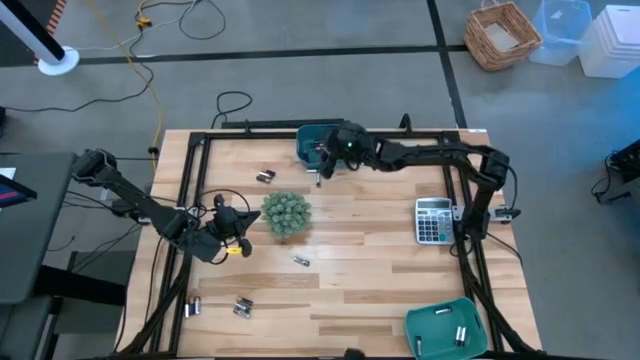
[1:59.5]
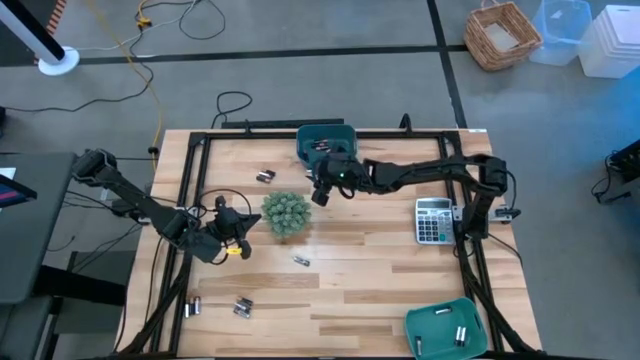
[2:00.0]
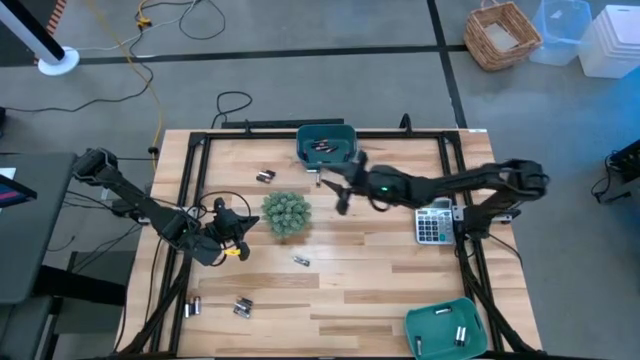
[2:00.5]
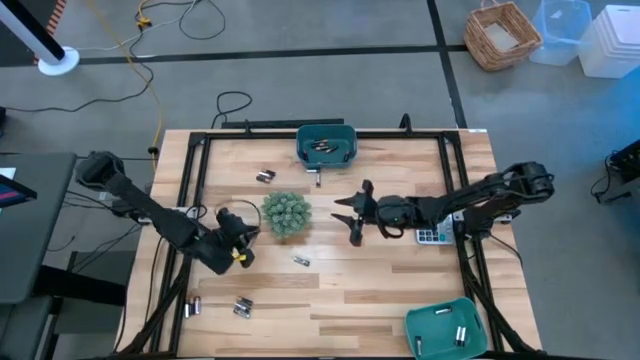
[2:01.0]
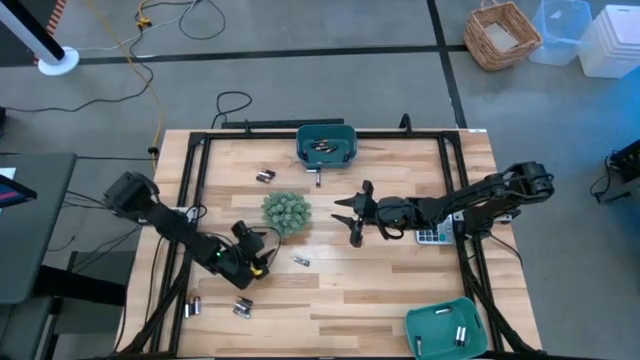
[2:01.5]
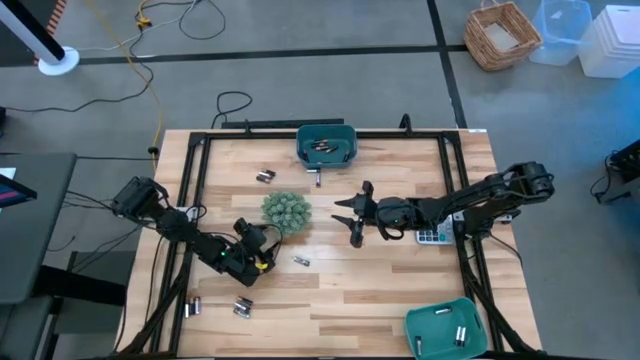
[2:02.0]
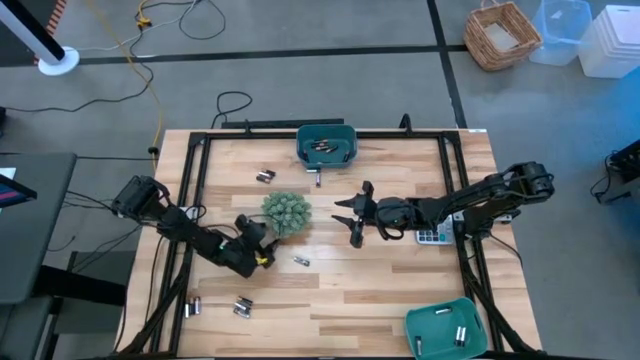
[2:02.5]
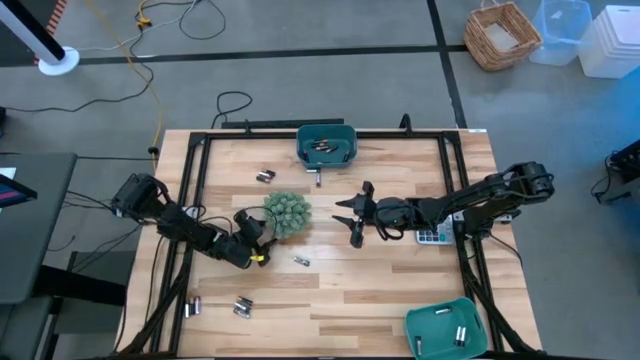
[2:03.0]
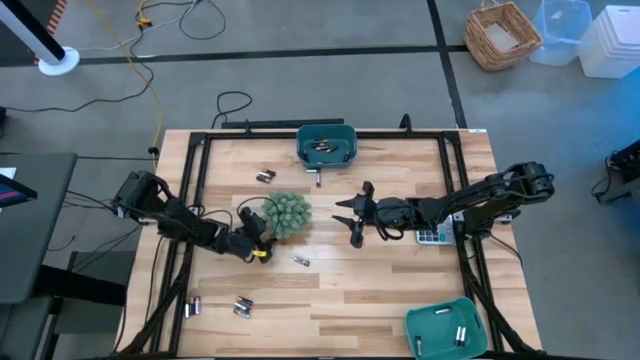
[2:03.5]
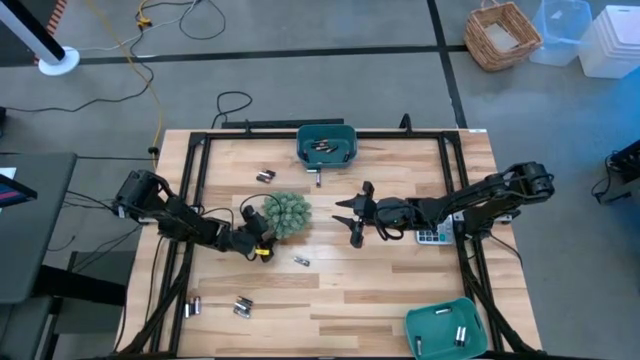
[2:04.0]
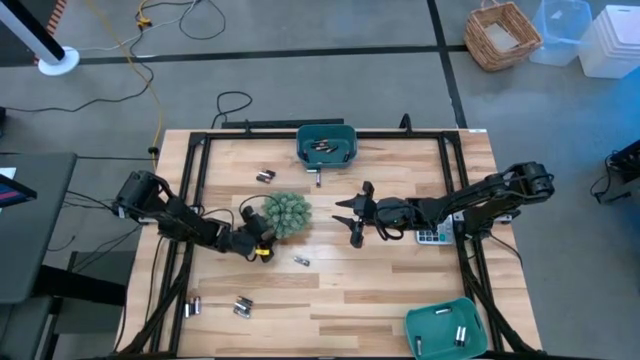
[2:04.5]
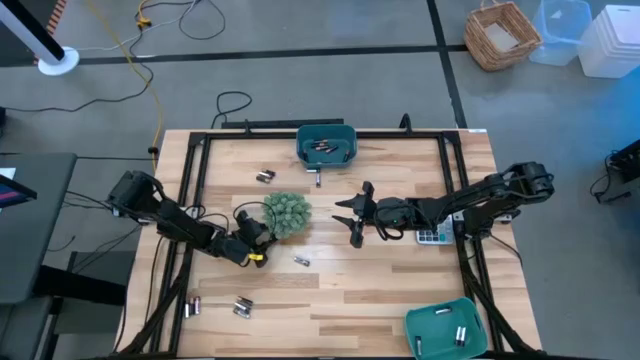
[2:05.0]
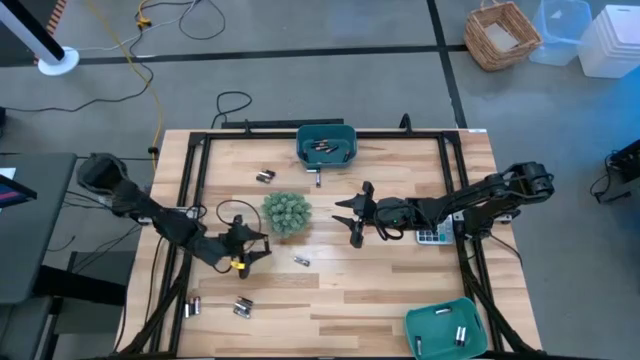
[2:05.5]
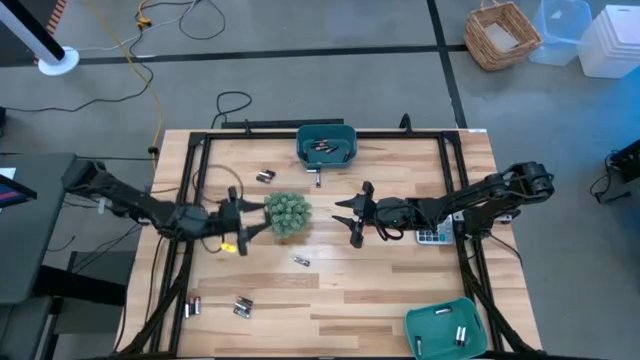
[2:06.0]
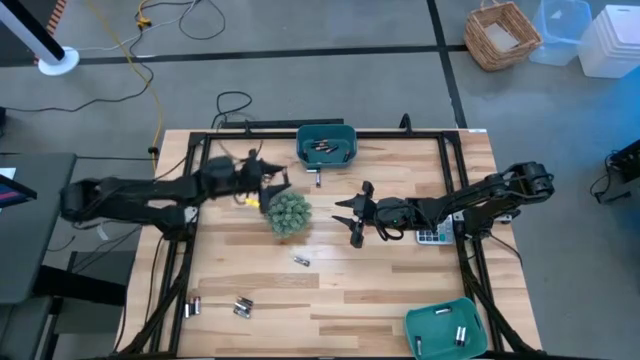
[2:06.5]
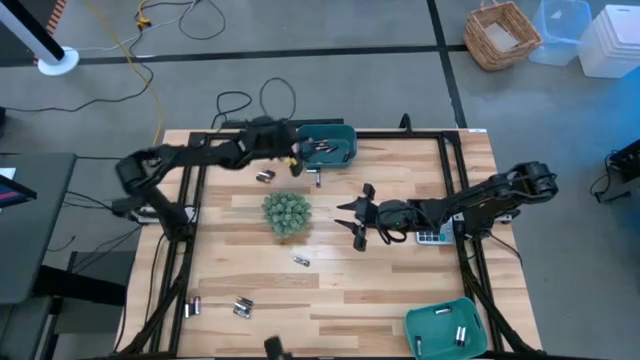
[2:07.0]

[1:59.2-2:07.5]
Task: Sort batteries
Put the black battery into the blue bin

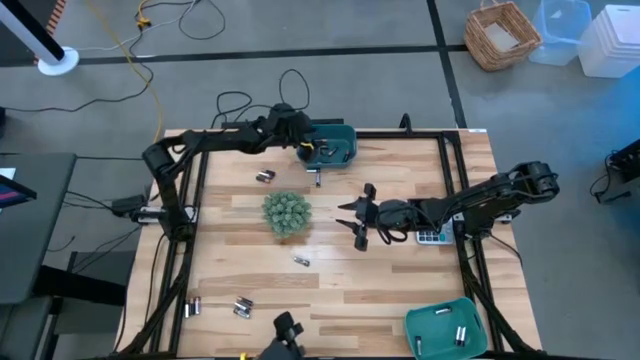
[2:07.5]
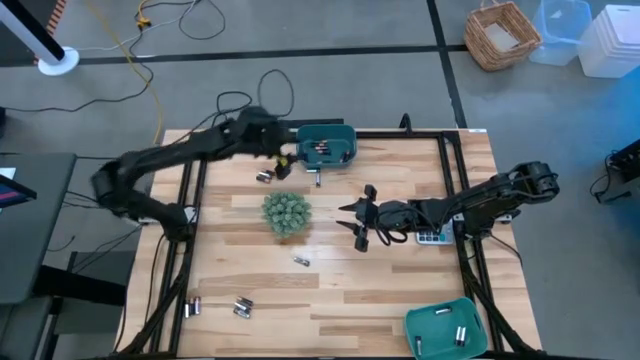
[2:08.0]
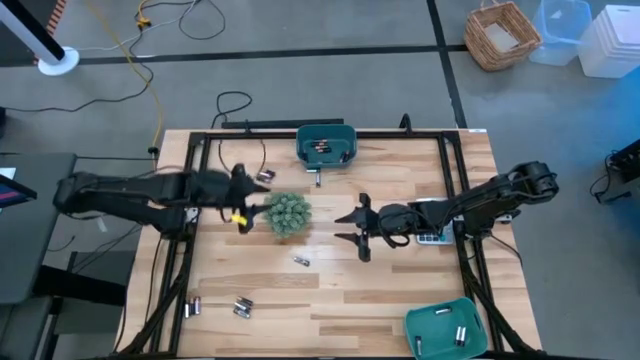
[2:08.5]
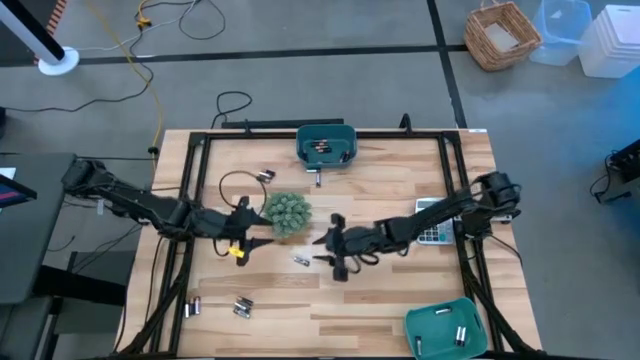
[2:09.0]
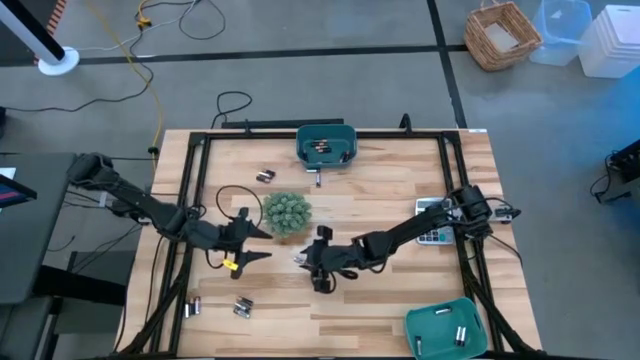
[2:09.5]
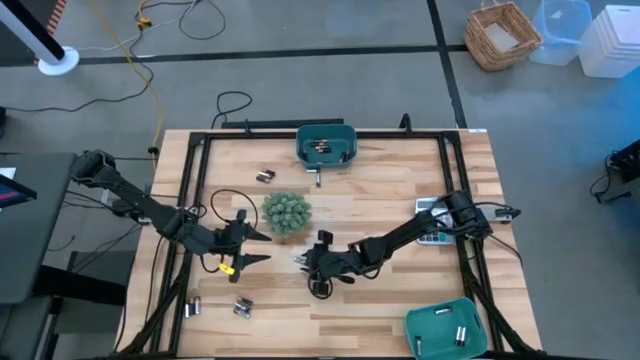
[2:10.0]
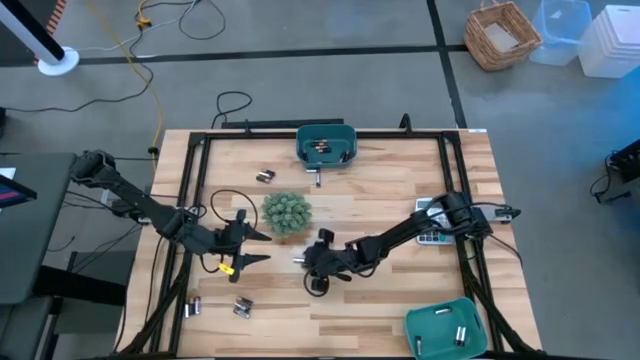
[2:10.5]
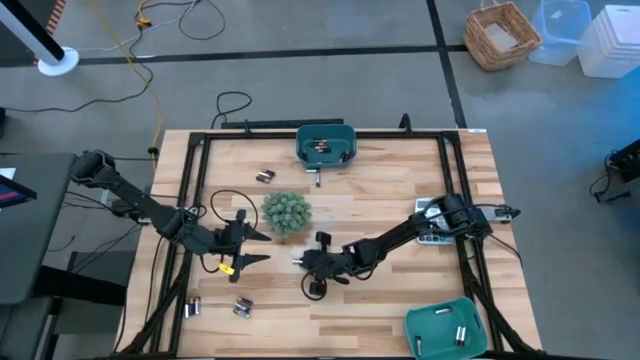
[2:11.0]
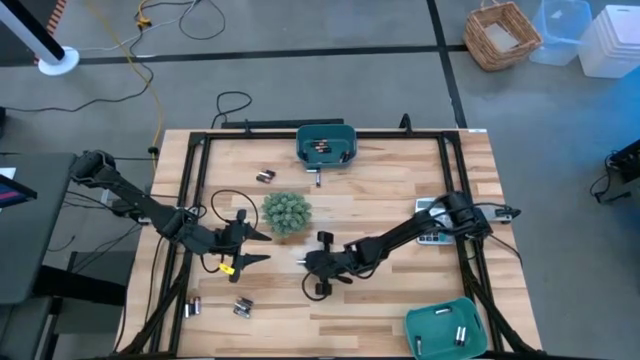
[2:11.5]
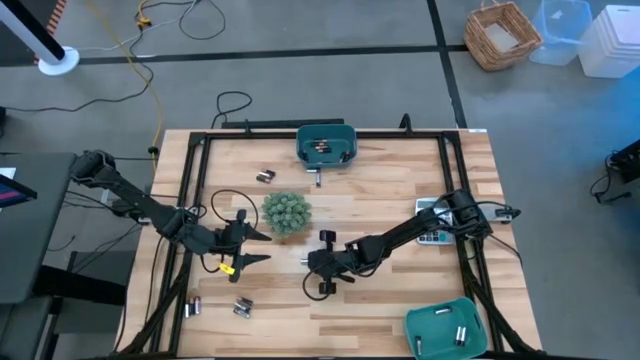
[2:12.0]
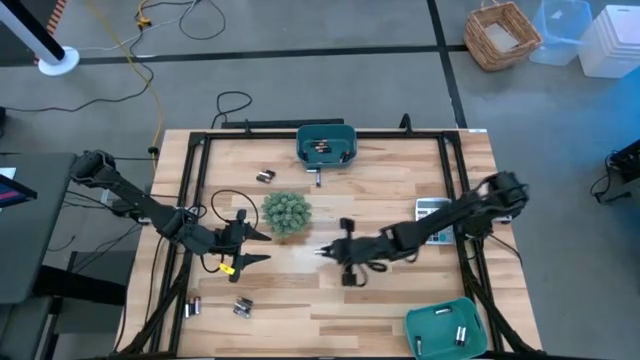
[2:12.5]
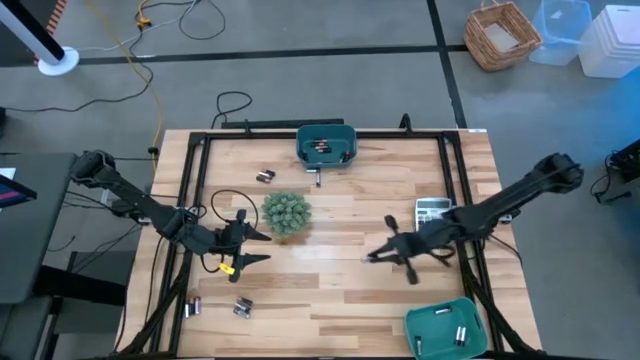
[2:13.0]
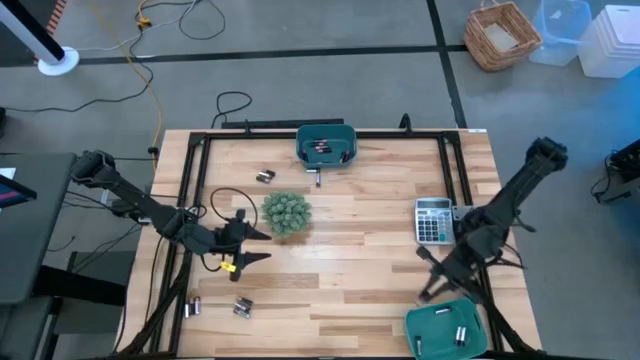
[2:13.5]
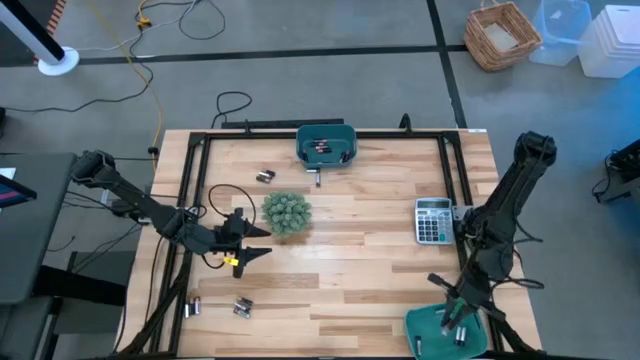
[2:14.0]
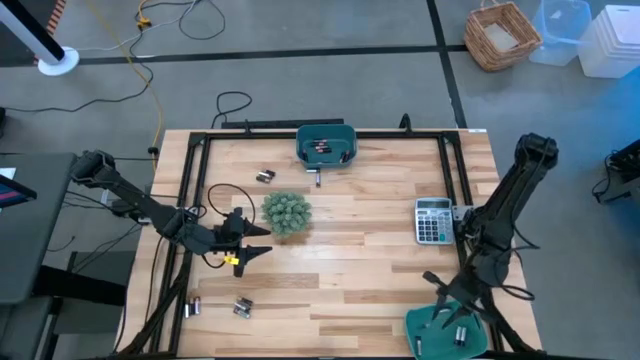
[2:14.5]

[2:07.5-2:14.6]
Put the silver battery into the green bin

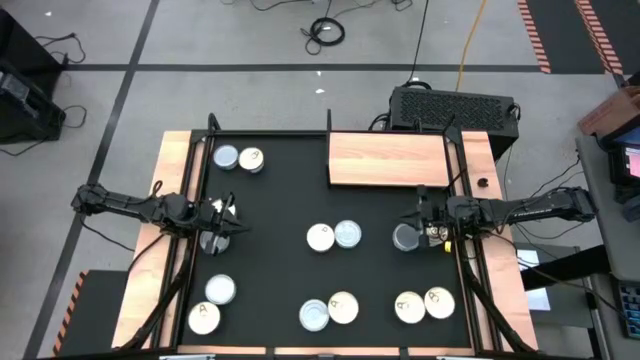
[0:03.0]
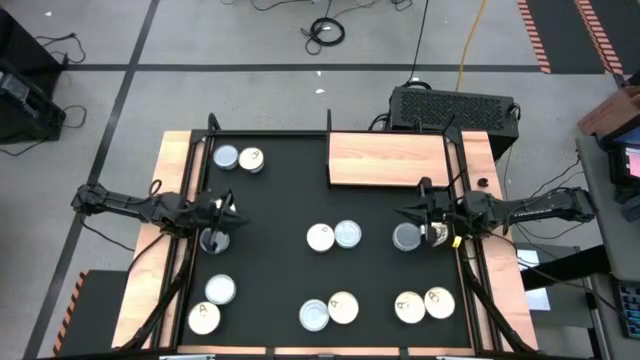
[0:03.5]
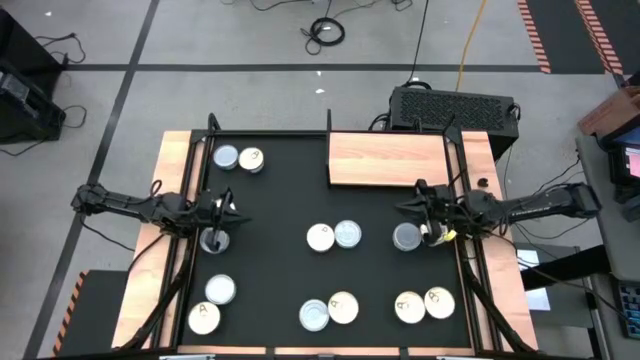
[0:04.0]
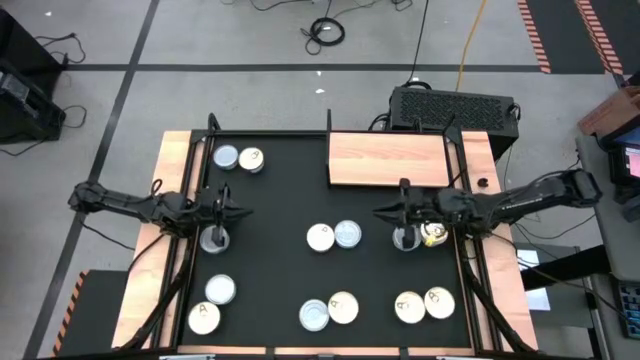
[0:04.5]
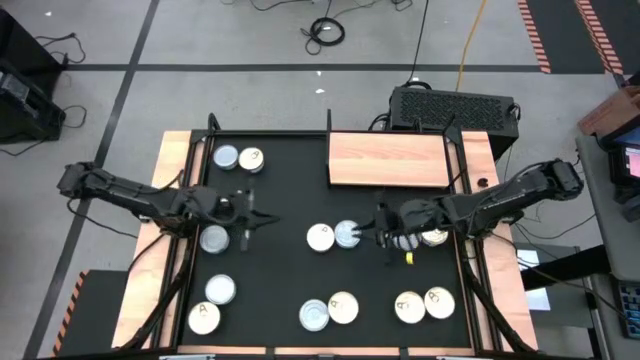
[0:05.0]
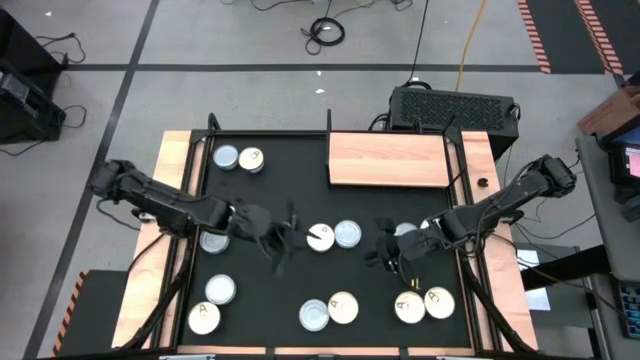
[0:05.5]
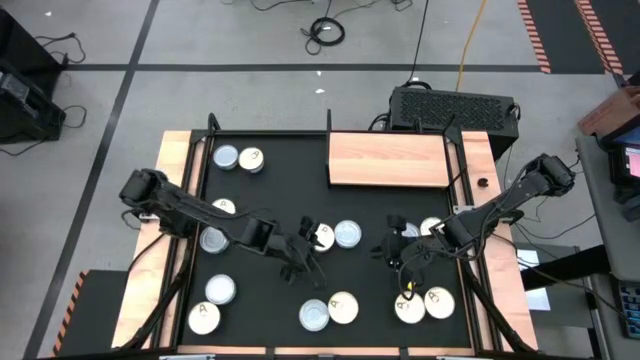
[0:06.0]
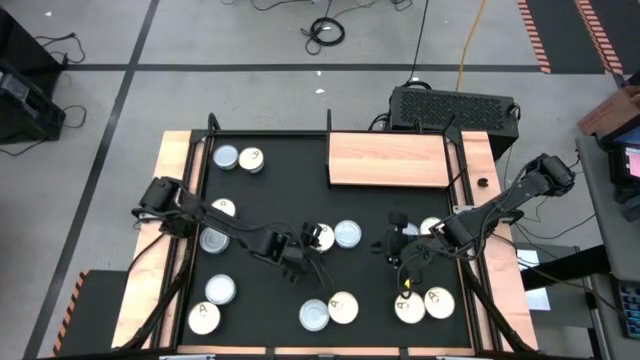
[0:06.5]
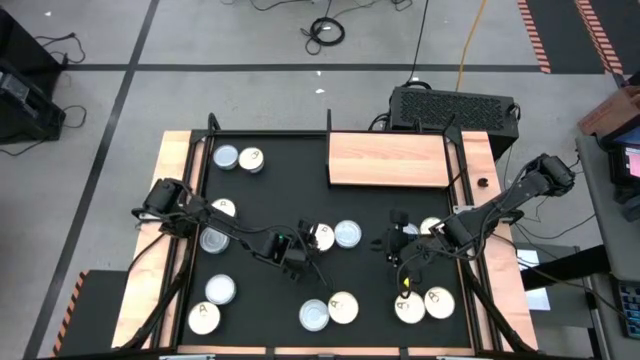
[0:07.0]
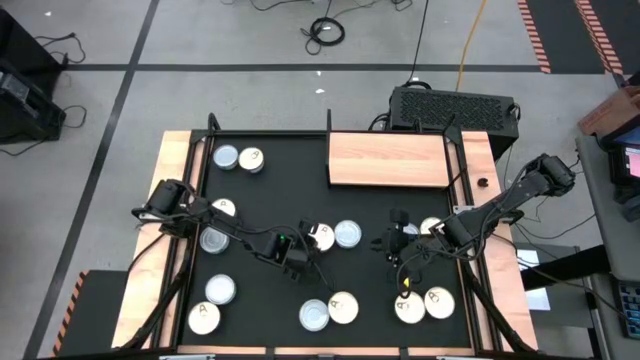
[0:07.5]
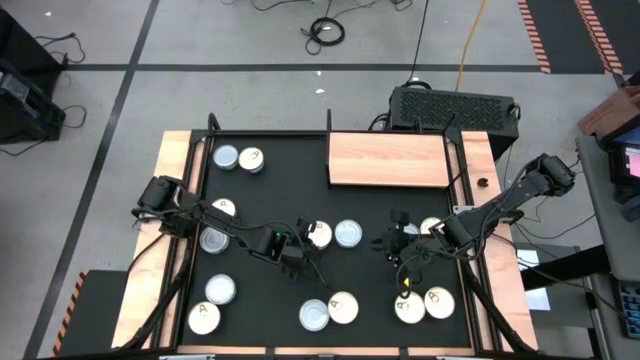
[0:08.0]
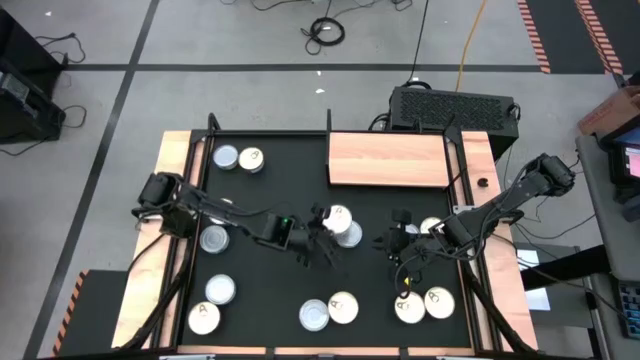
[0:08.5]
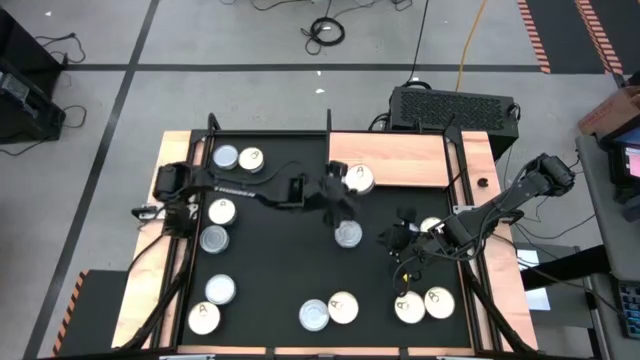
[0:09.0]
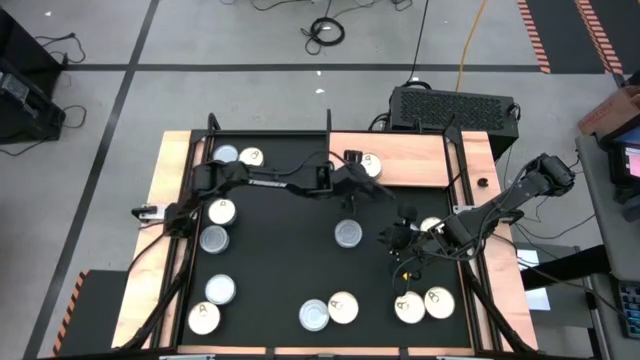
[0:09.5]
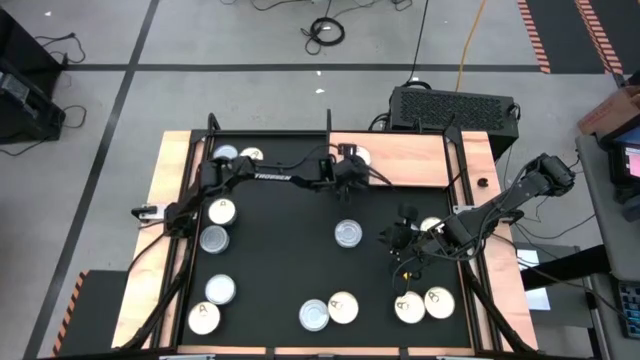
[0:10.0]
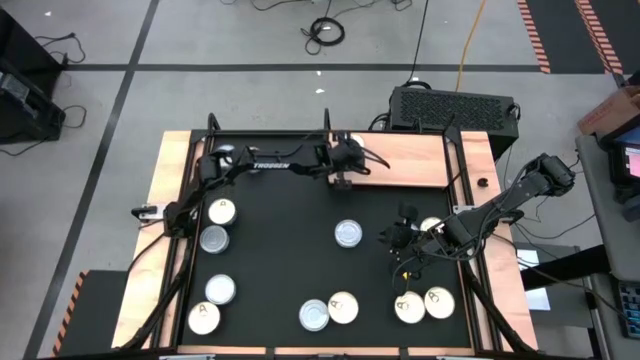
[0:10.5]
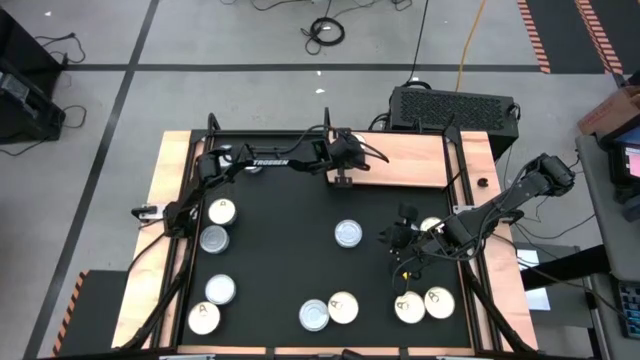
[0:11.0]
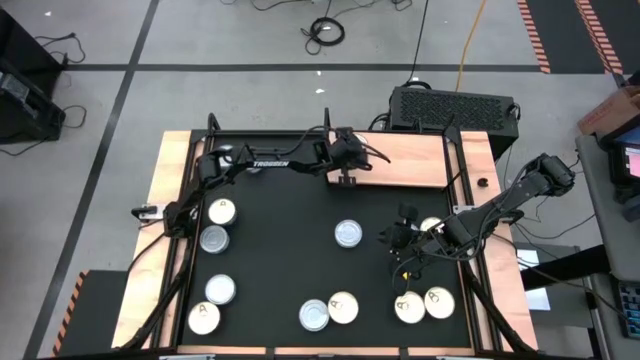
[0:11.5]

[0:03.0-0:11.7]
Task: Stack canned seafood by type on shelf
Put the blue-pink tuna can on the shelf
